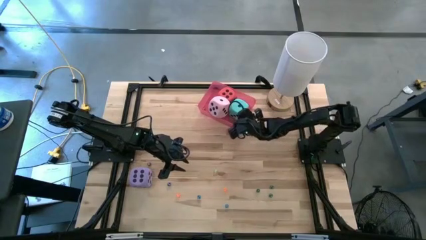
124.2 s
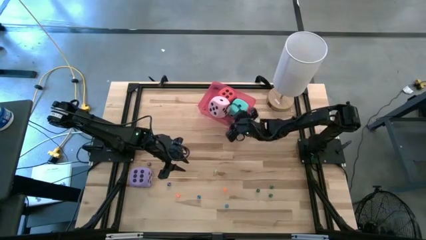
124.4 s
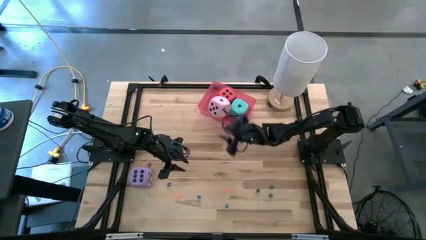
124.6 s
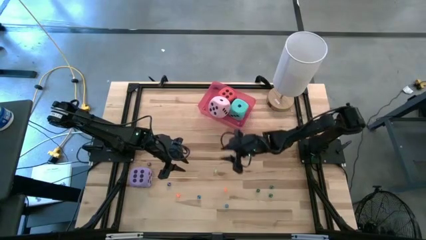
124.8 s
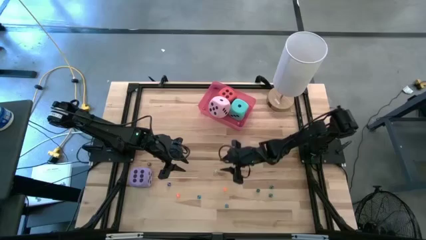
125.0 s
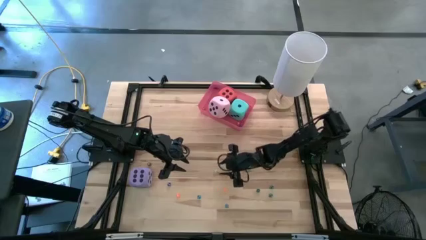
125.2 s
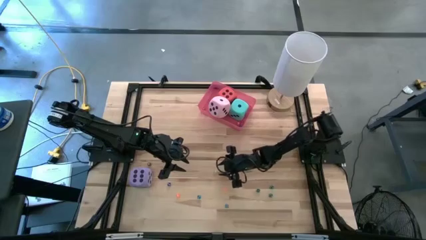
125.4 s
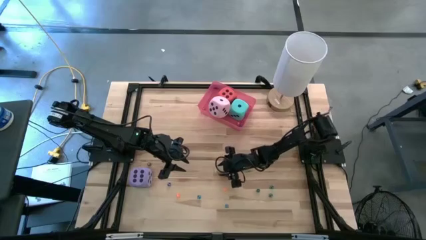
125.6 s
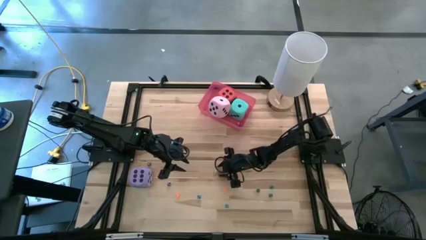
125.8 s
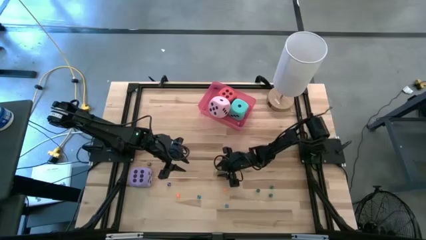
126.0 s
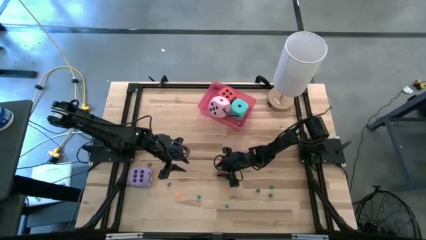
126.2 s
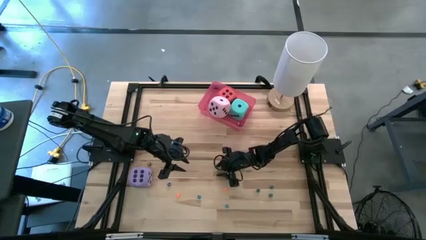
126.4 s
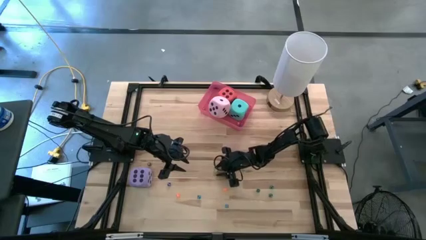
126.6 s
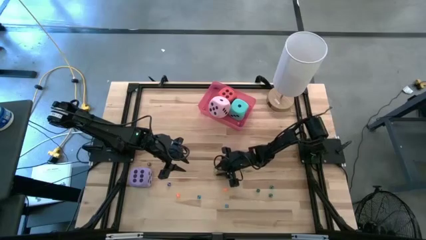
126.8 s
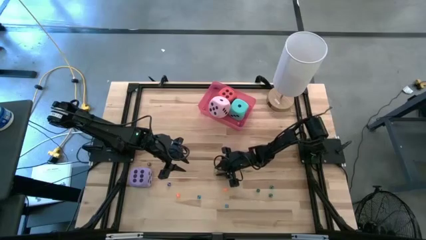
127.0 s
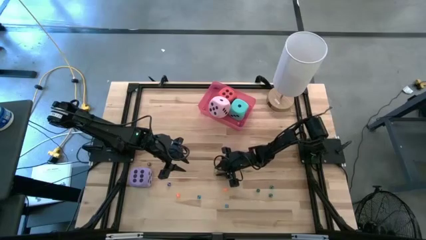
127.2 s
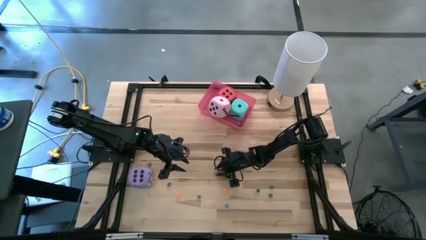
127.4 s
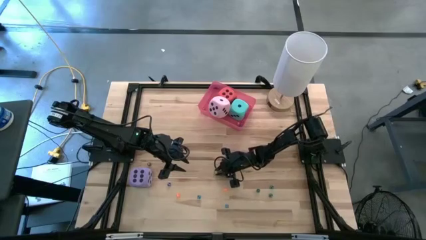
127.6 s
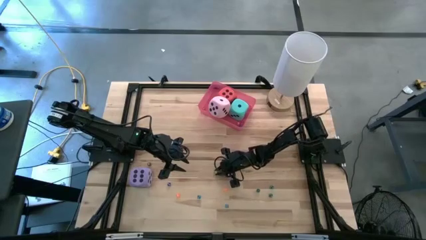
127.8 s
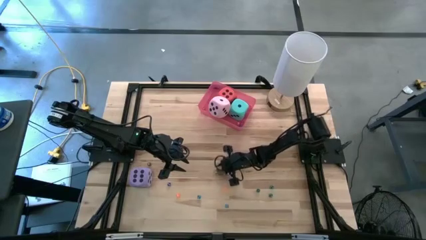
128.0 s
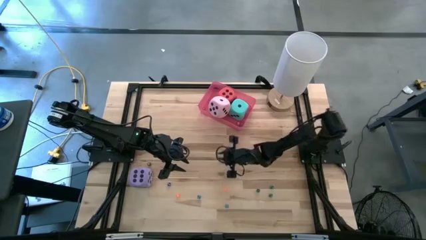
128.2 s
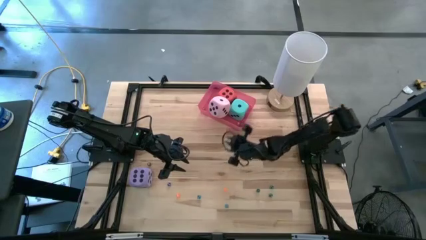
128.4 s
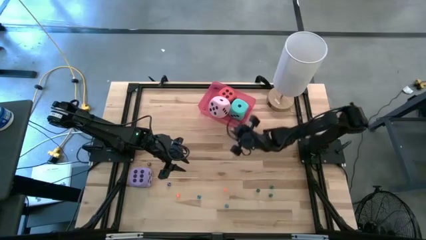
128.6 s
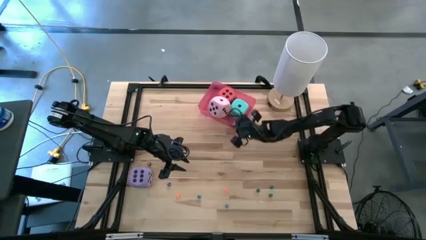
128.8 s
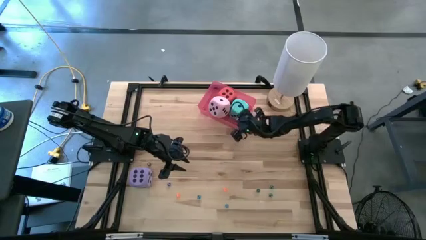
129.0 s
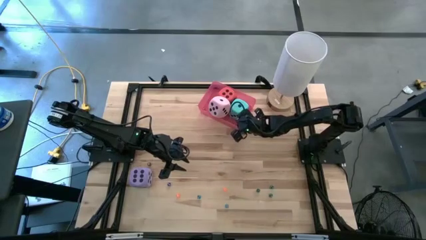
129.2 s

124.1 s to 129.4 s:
Task: Pick & Place Dice
Put the small light green dice into the pink bin

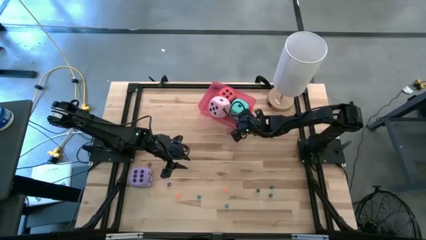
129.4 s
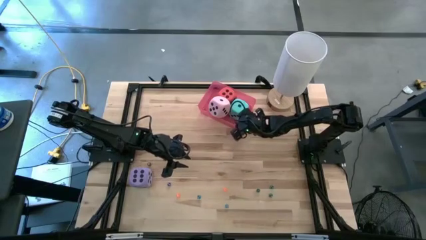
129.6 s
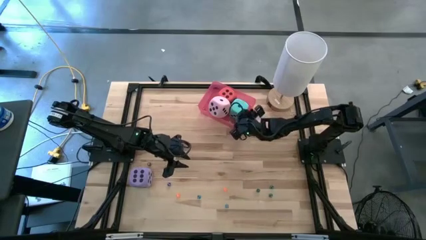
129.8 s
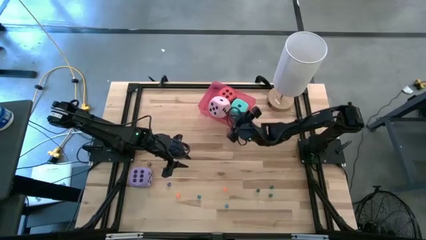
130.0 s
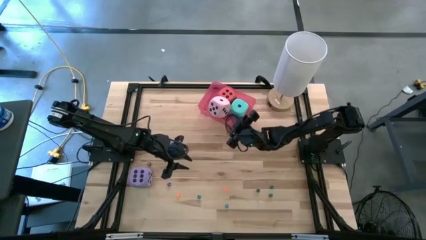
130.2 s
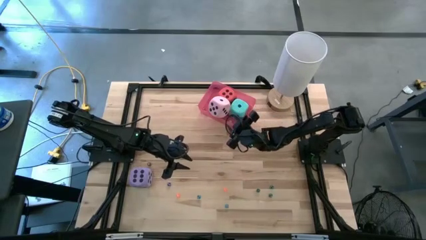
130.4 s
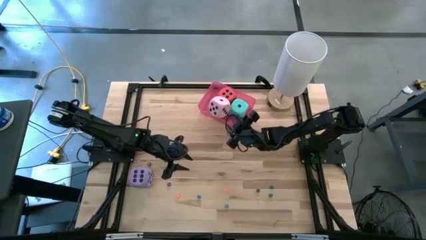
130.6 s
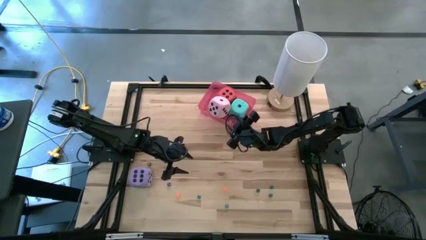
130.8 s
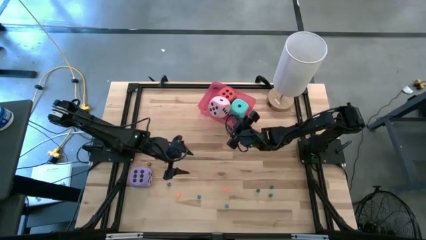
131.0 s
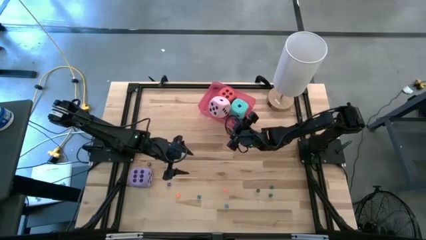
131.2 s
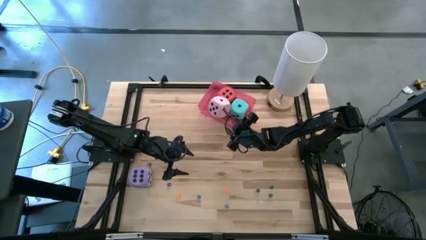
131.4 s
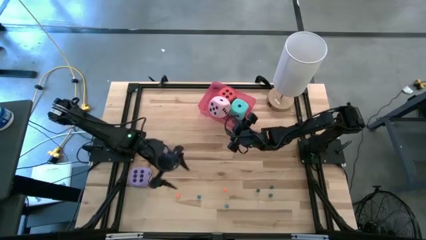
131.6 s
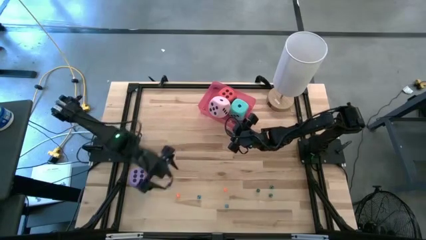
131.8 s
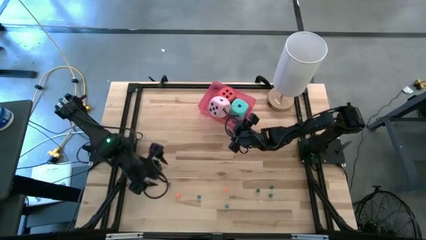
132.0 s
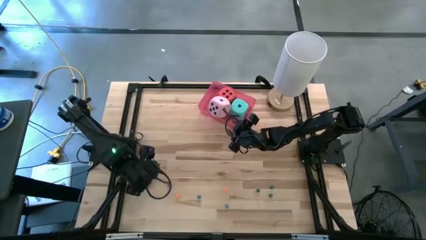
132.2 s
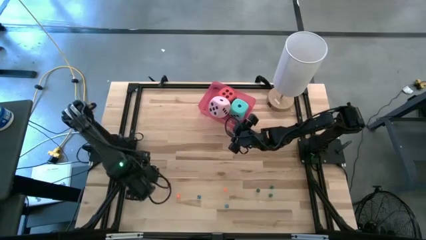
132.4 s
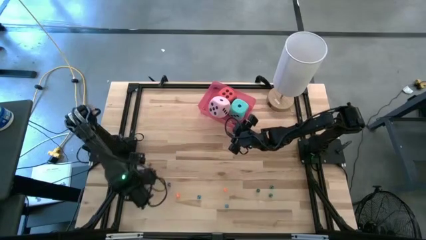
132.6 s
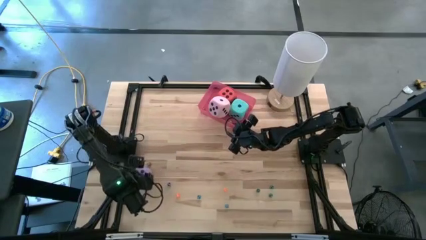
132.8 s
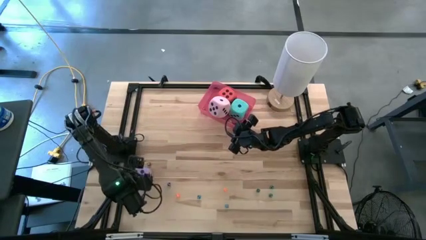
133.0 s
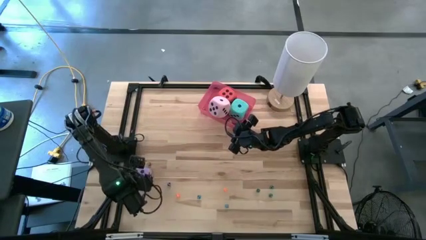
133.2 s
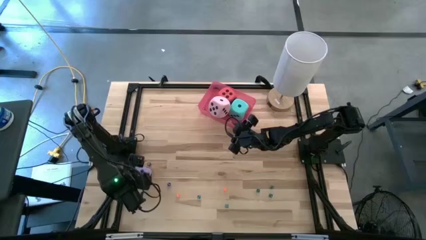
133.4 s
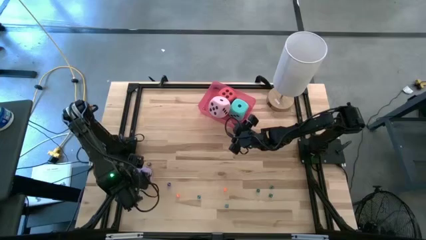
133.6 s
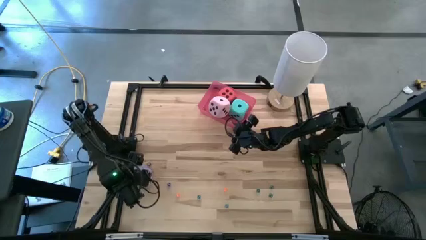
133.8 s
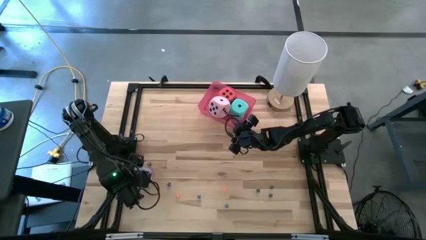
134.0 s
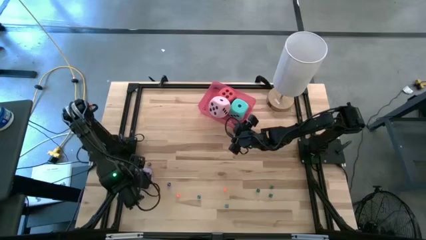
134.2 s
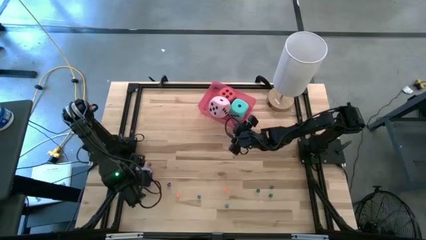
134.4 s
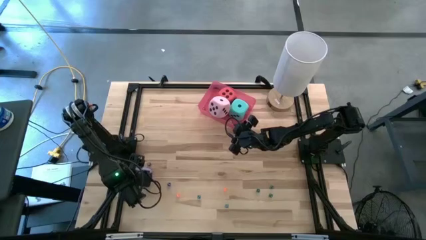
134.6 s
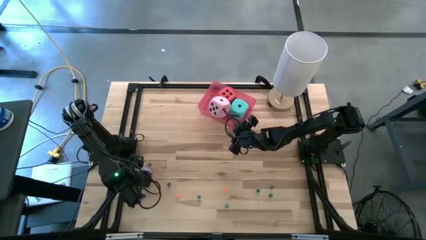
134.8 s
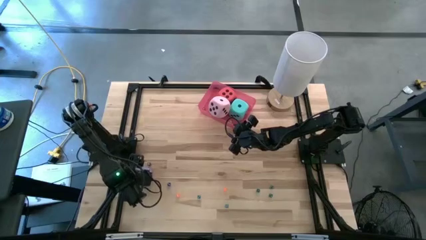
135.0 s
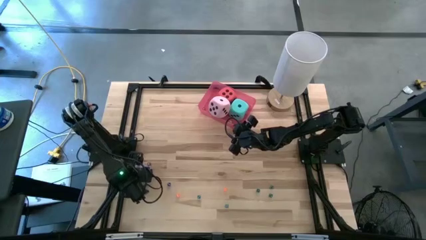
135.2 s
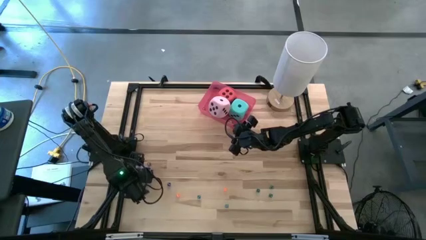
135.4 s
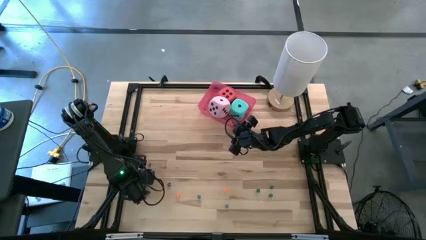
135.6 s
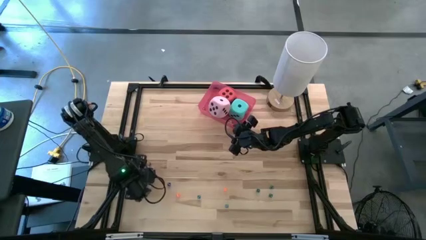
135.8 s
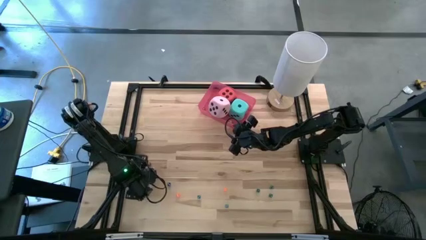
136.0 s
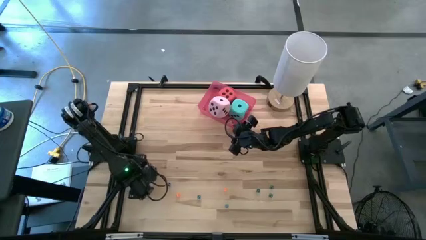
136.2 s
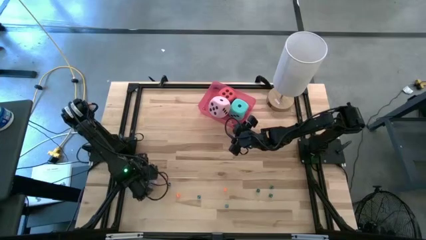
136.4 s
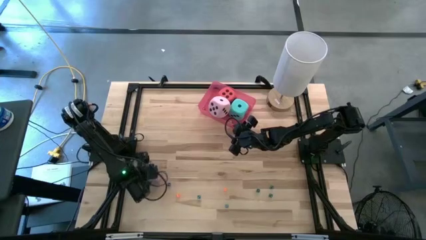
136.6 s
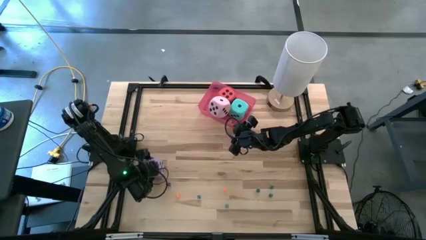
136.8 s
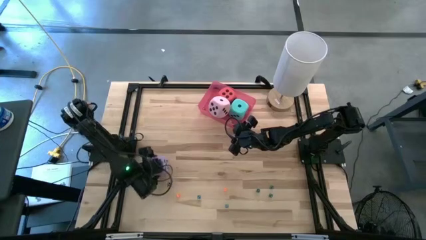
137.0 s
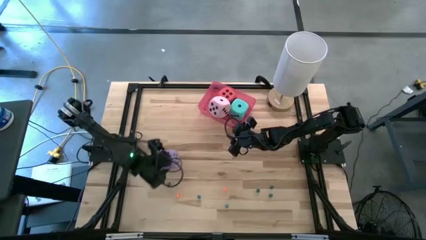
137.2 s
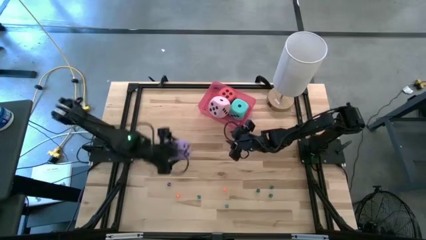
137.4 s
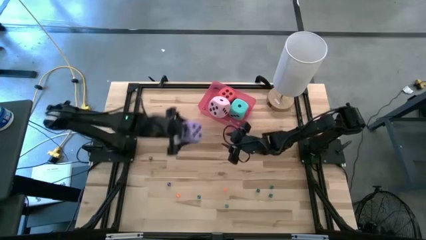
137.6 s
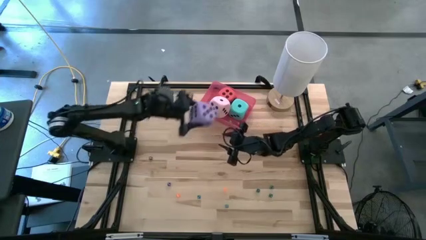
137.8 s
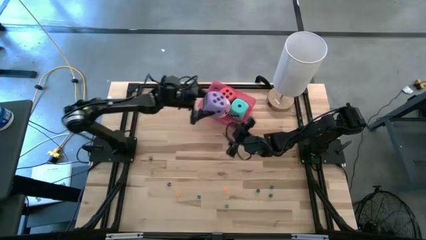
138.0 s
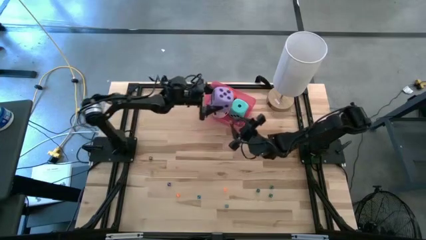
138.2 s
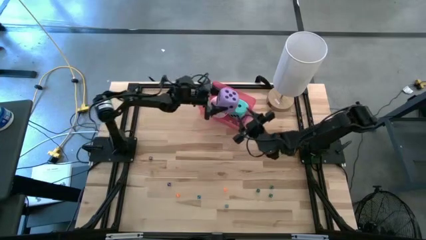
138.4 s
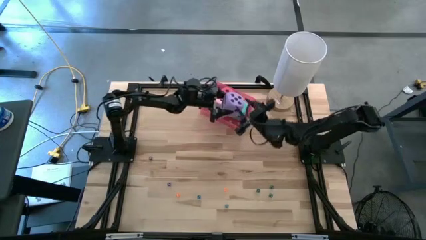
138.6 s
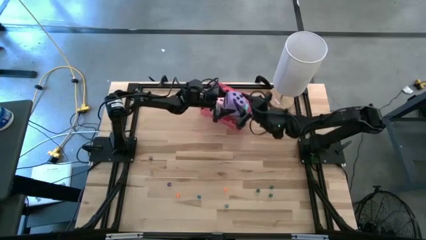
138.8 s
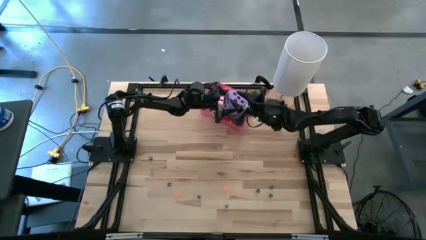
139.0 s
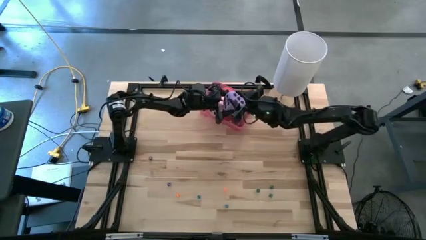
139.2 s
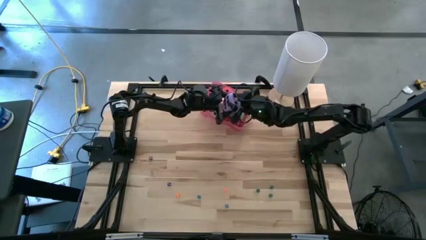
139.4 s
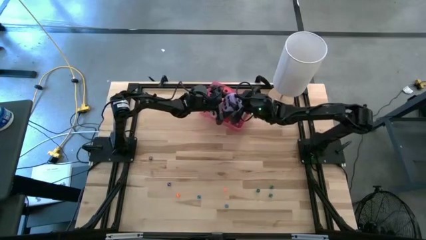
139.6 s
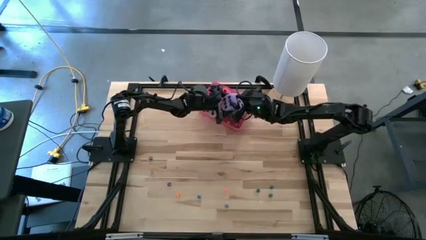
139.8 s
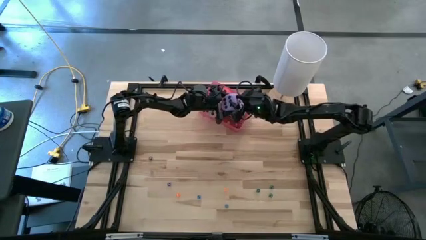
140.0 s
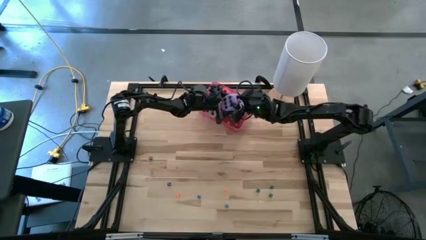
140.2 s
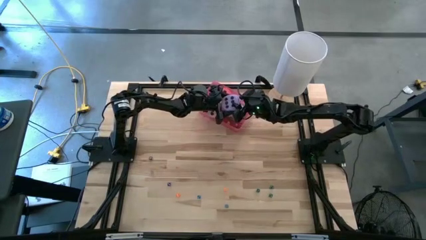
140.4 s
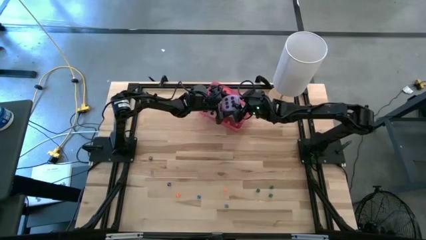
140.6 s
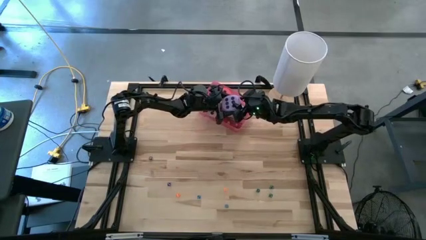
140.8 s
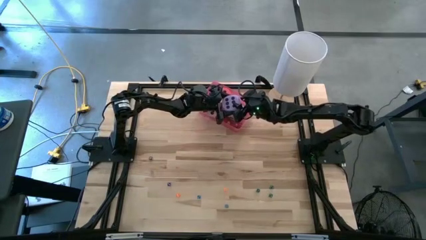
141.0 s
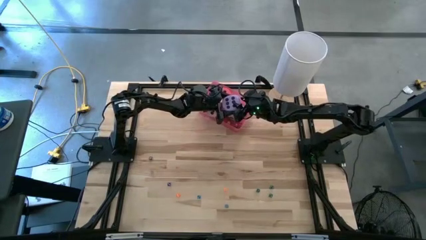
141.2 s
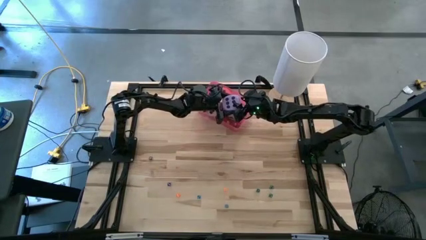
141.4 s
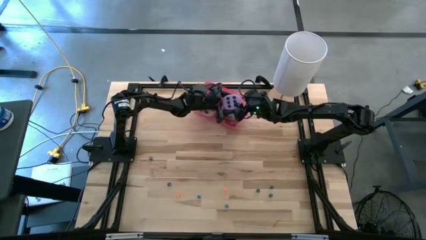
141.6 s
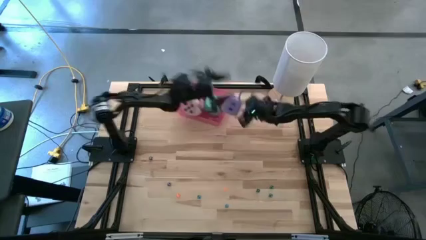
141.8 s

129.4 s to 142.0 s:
Put the large purple dice into the pink bin
